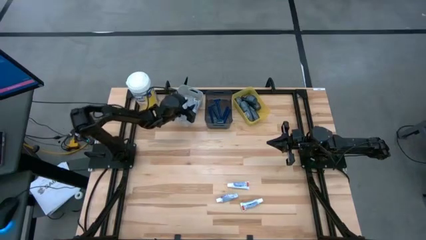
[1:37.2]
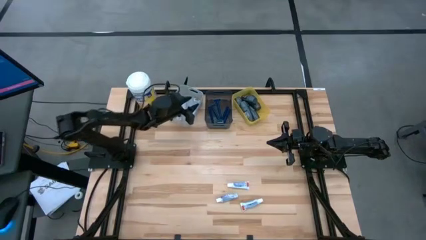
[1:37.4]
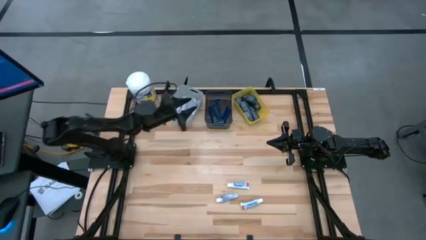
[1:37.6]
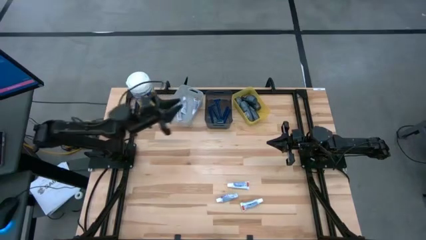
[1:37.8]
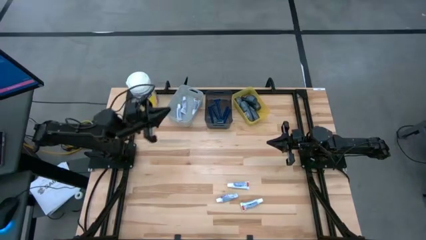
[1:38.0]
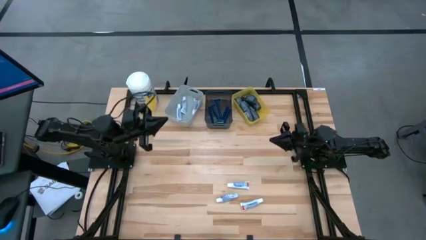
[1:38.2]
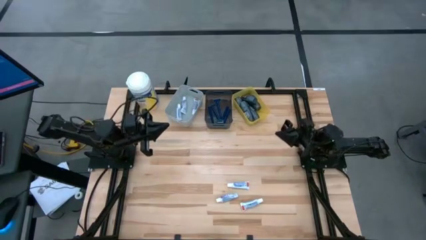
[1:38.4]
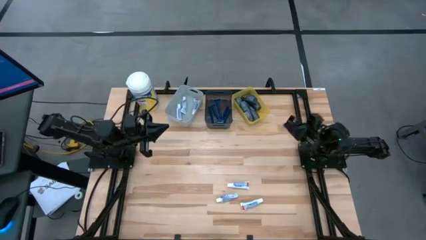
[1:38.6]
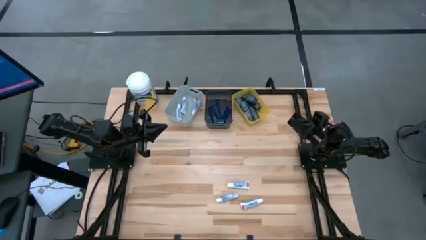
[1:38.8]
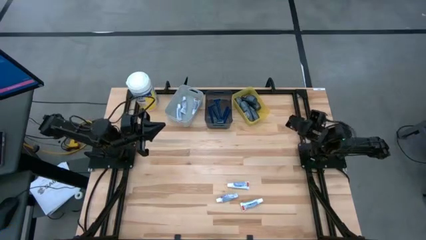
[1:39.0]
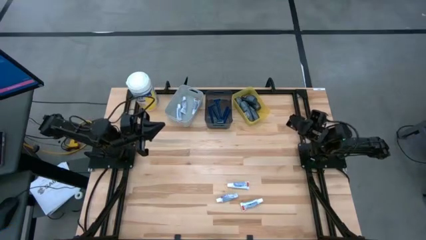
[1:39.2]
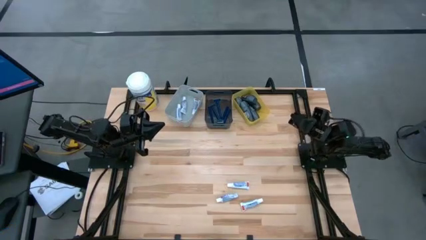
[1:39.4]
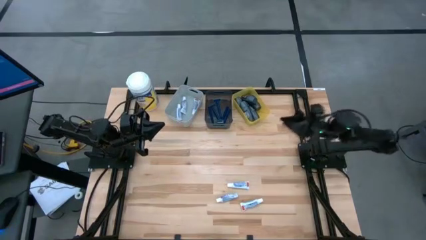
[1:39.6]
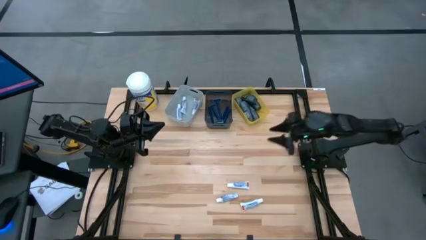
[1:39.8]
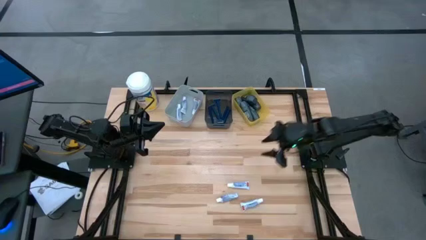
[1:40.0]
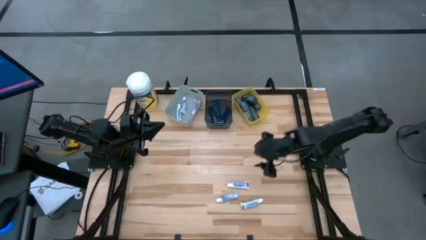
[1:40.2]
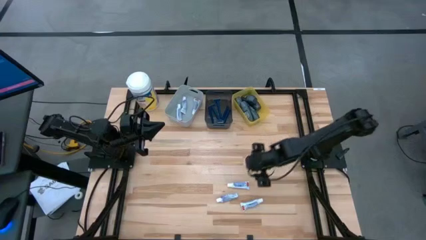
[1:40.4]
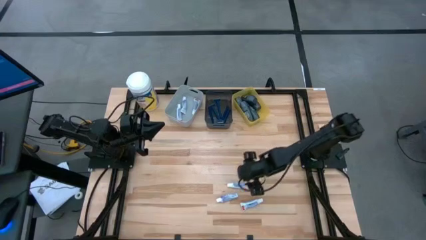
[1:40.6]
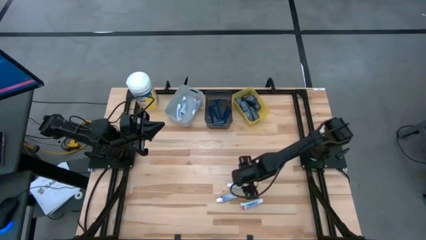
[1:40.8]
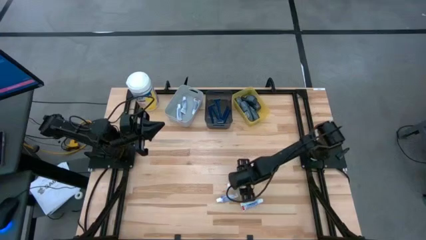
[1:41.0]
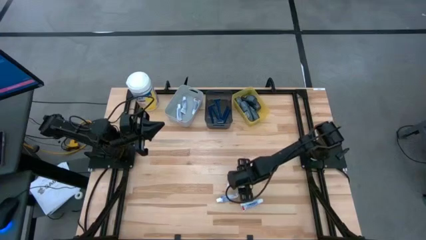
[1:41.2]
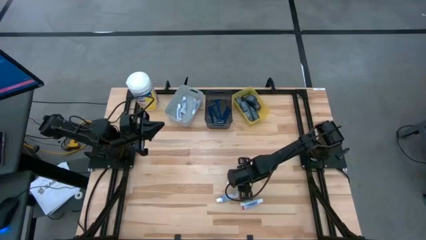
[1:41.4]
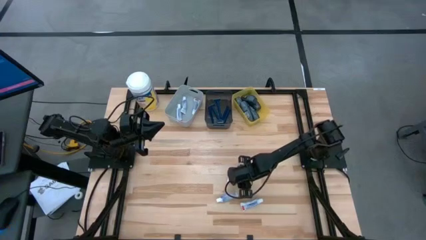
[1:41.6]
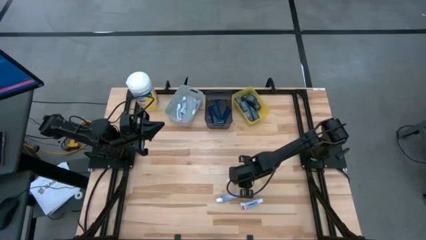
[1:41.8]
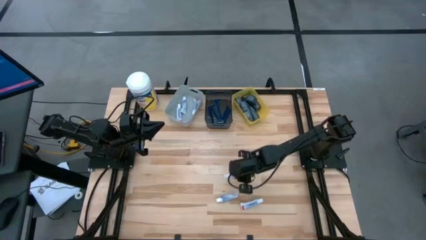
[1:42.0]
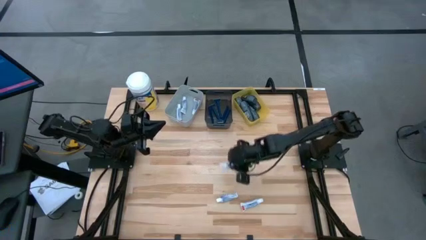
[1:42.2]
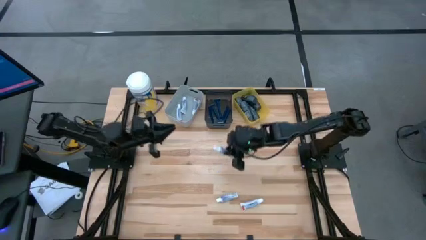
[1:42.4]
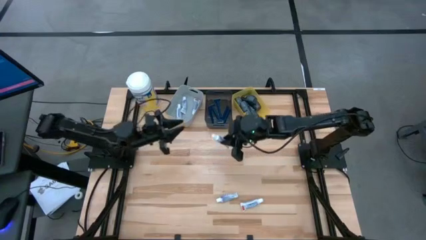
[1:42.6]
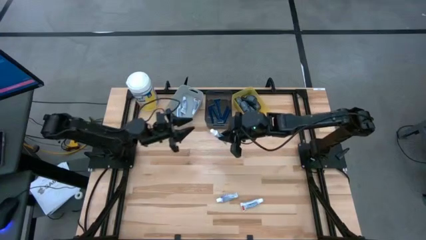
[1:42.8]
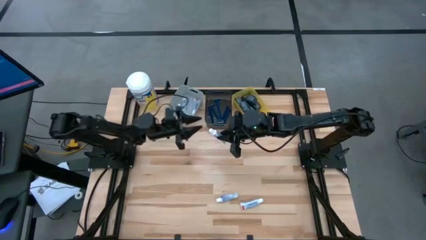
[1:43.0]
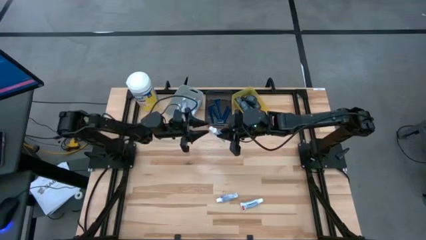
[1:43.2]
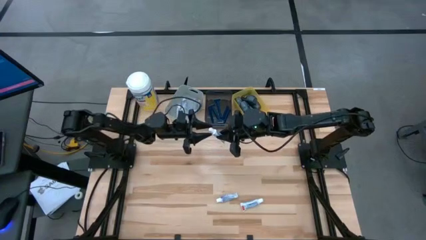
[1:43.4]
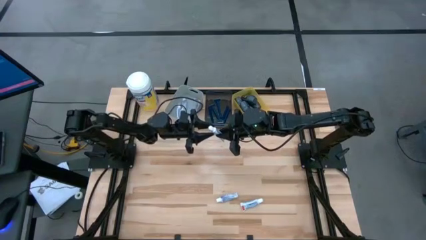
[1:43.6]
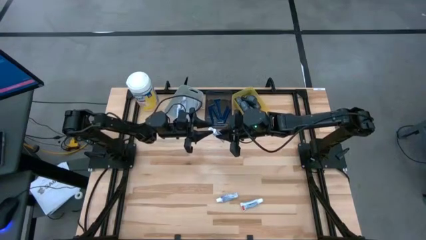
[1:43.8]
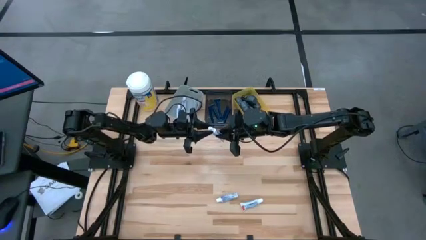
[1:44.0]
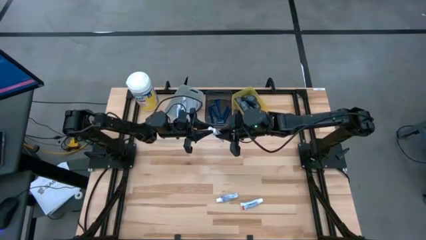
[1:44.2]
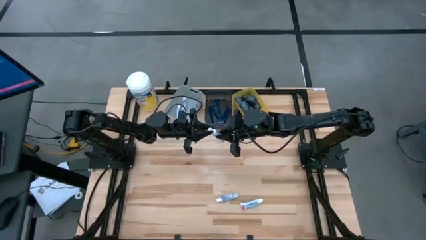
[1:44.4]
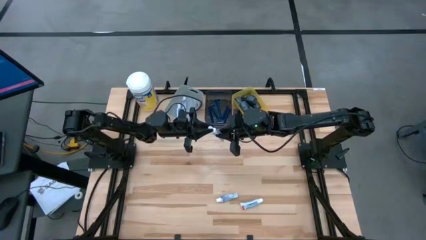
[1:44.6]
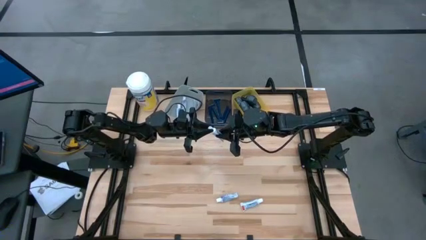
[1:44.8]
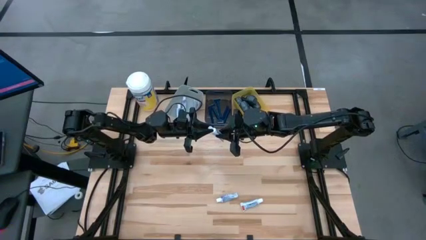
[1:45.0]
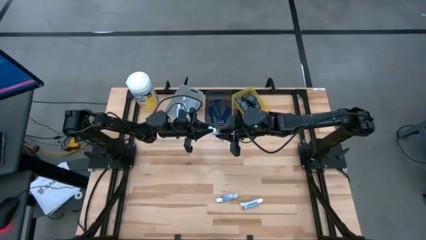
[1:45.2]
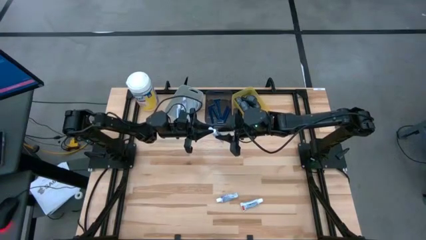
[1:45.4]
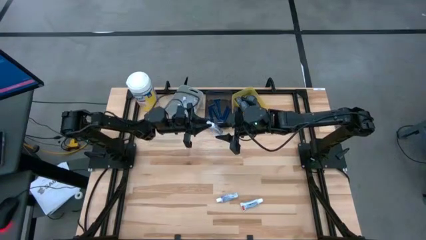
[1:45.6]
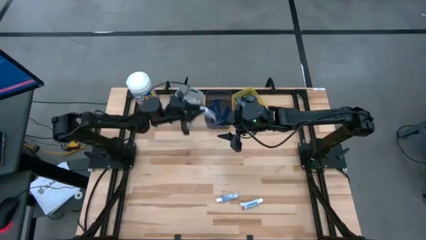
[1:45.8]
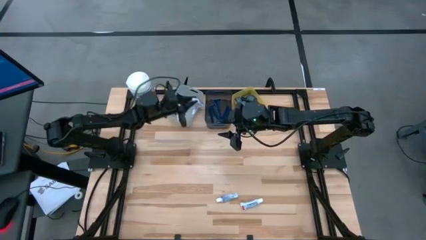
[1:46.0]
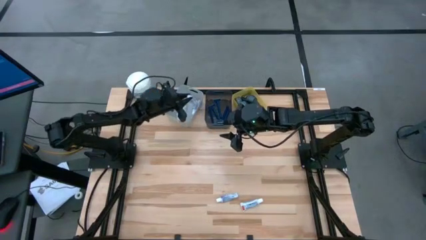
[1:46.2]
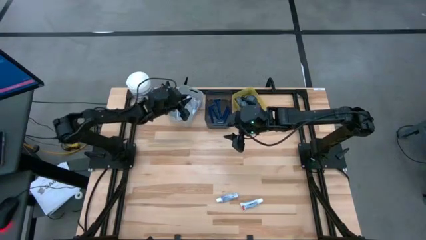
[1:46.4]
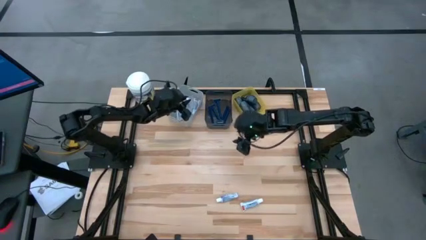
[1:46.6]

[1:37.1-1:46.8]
Task: Pick & Place Travel size toiletries
Put the toothpaste into the gray bin

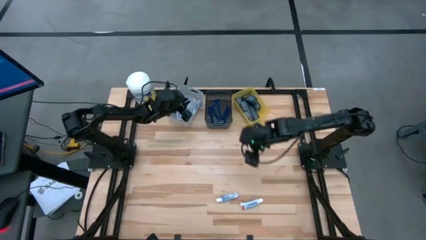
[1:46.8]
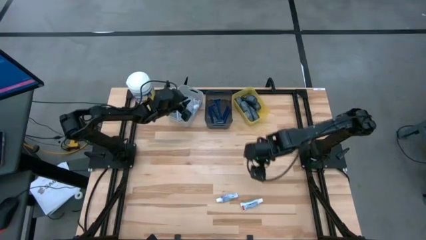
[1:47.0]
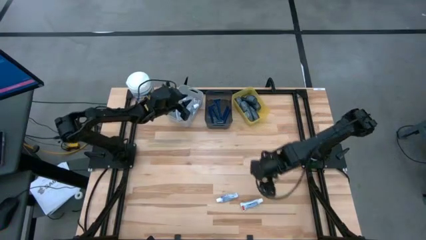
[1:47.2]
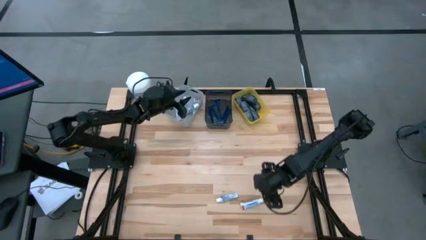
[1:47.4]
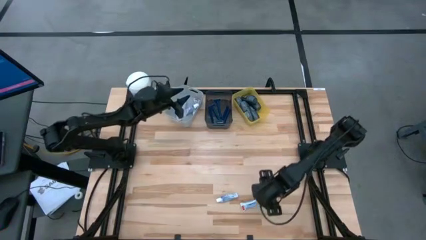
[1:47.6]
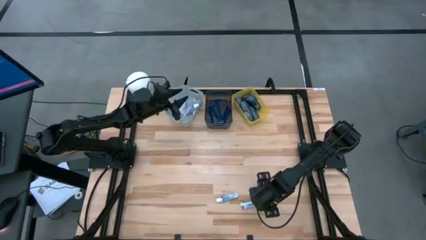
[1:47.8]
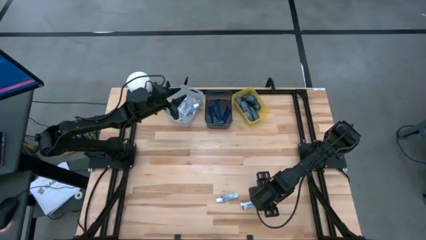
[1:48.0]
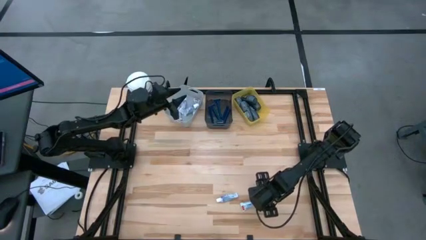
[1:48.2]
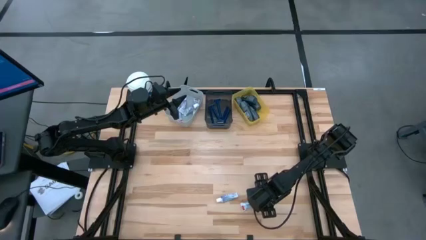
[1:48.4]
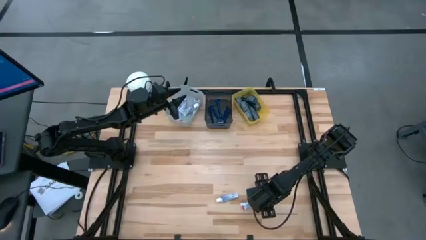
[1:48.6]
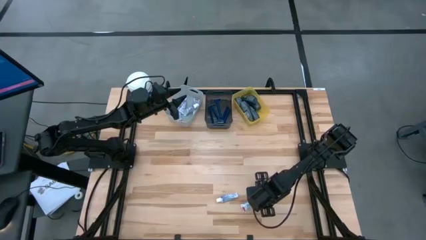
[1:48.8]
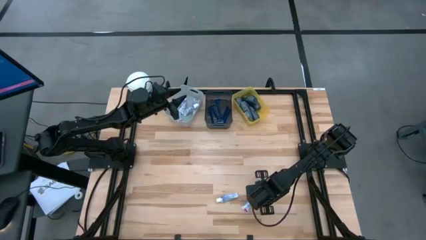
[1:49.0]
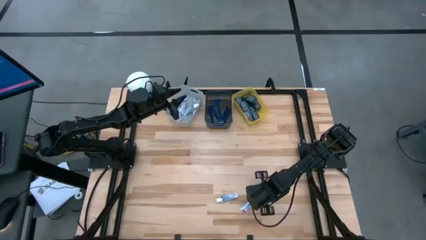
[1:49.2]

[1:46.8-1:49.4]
Put the toothpaste into the gray bin

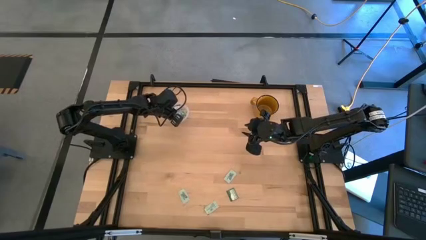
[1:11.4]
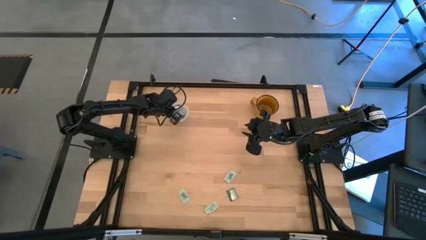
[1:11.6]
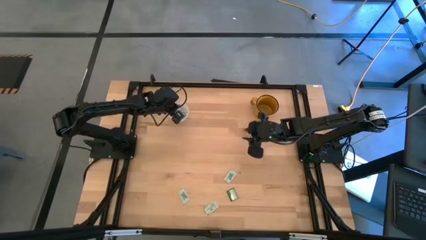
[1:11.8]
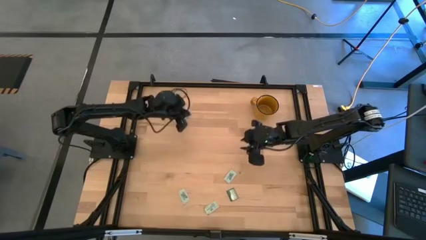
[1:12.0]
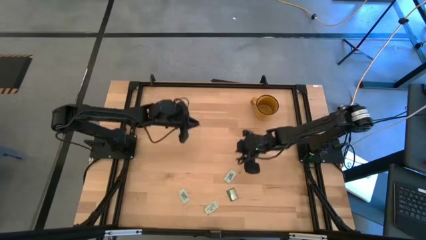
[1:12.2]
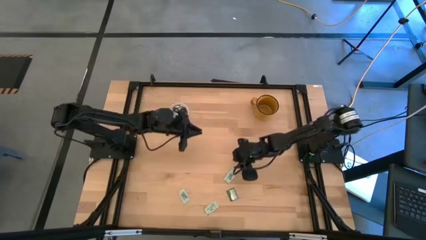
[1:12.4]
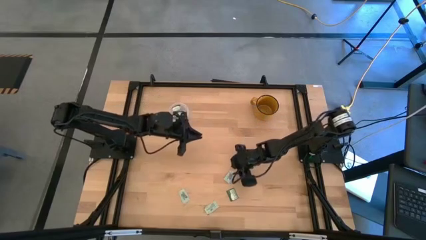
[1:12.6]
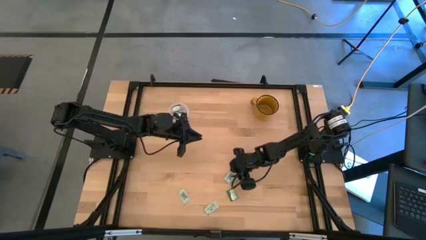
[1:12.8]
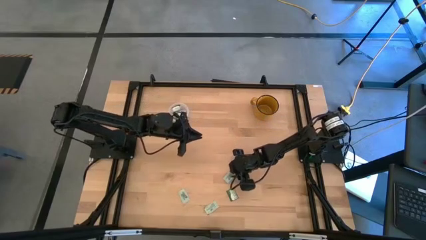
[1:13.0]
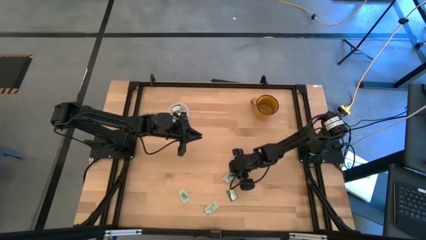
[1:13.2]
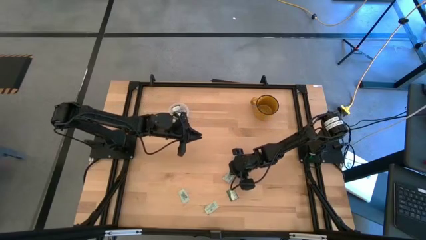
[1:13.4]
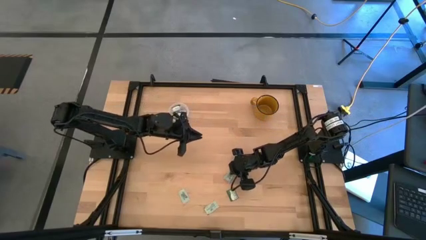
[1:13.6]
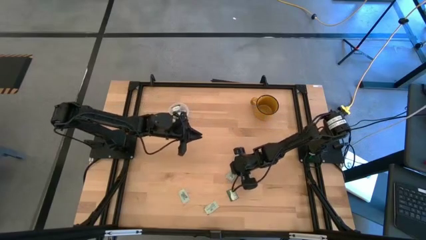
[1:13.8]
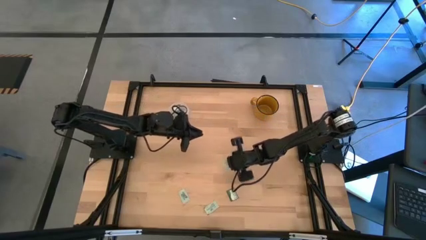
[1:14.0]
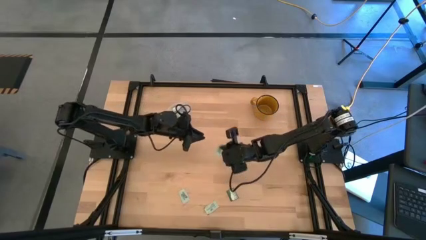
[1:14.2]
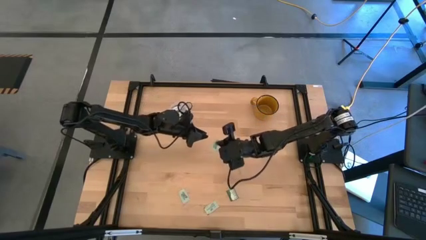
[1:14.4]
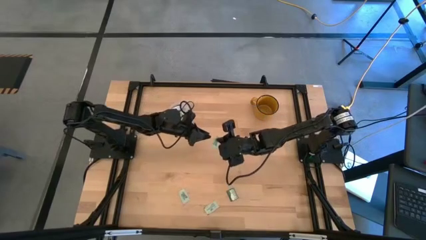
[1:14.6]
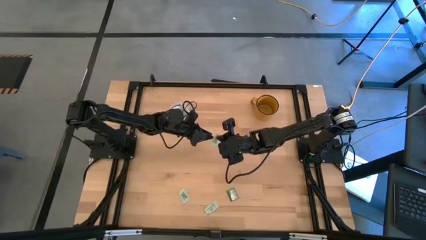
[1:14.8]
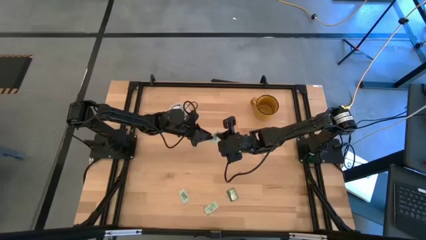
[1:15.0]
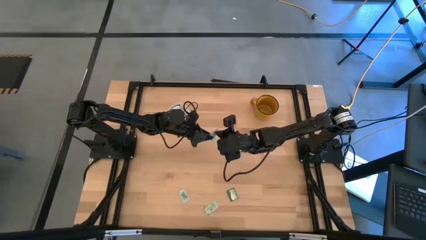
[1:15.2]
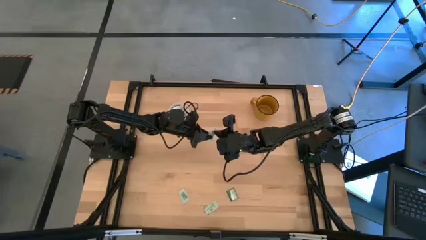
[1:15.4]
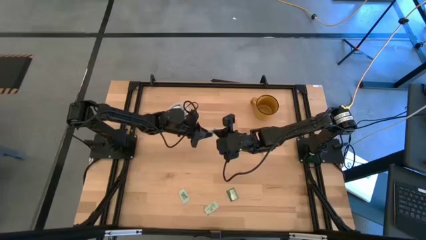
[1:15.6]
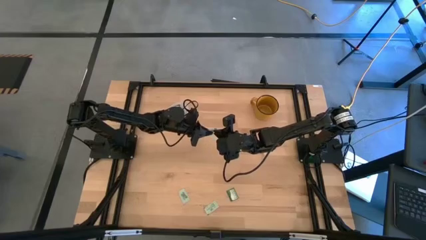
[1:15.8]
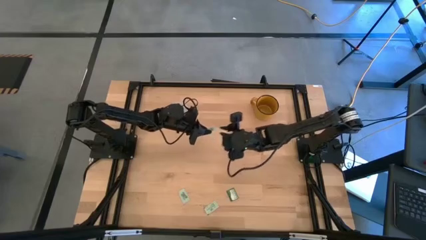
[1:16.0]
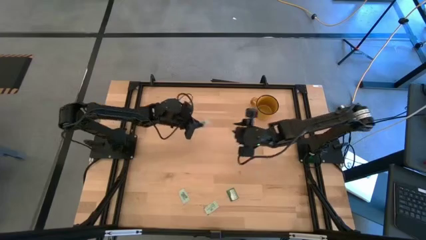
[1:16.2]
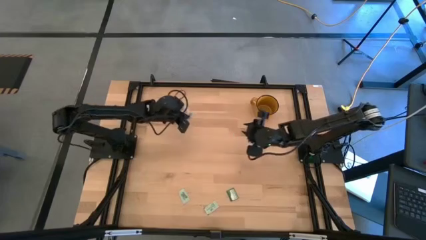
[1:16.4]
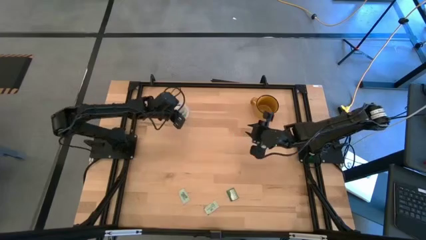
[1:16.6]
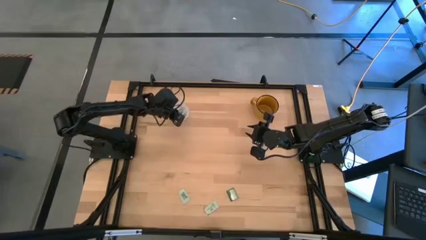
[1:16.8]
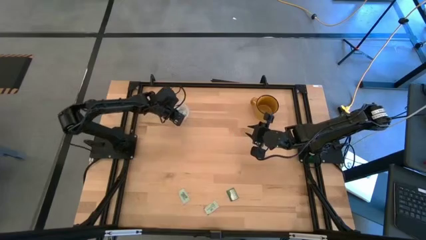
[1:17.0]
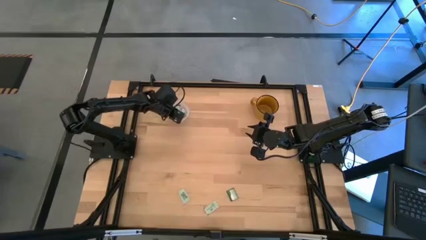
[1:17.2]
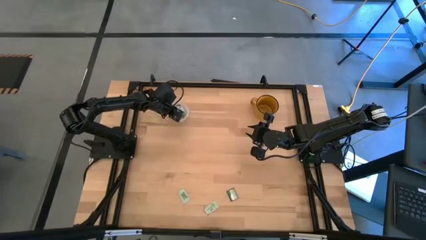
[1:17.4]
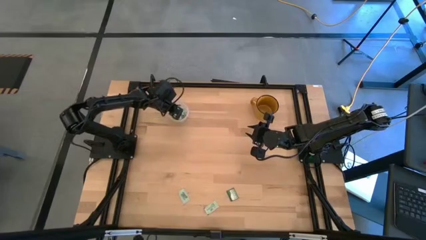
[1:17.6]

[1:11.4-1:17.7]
Task: Pick and place Stevia / Truvia into bins
Put the stevia packet into the transparent container
